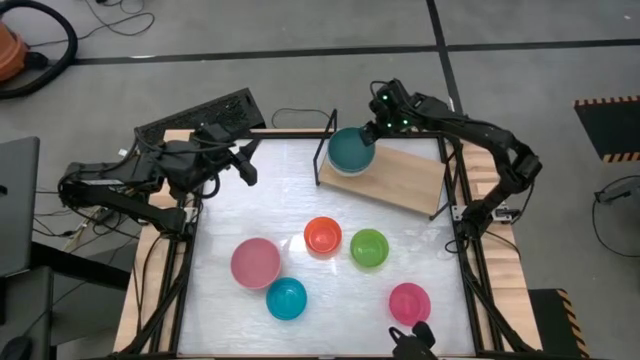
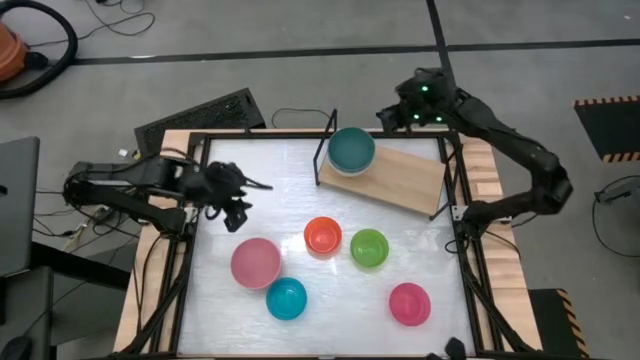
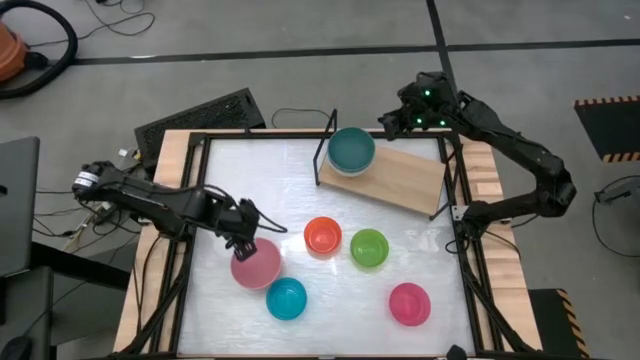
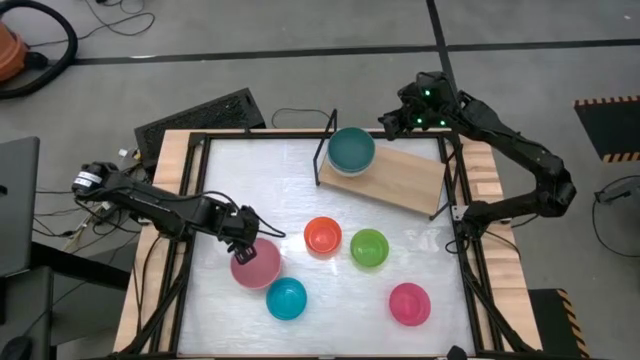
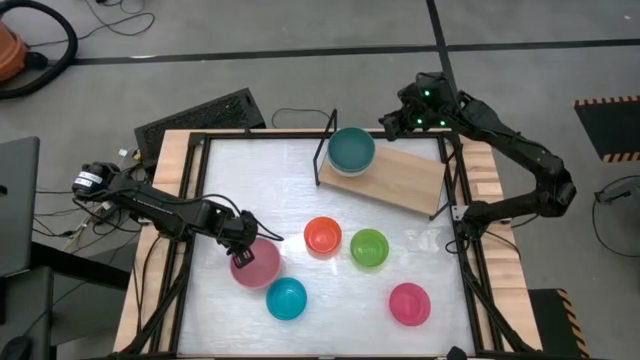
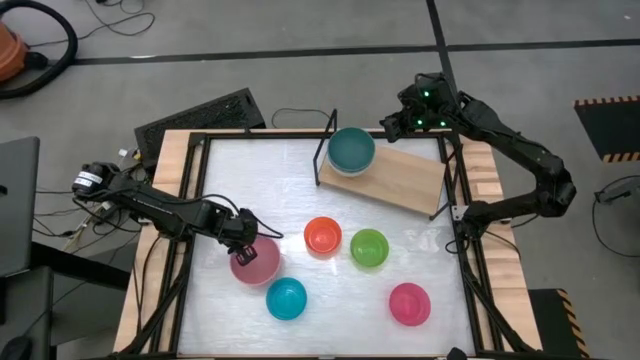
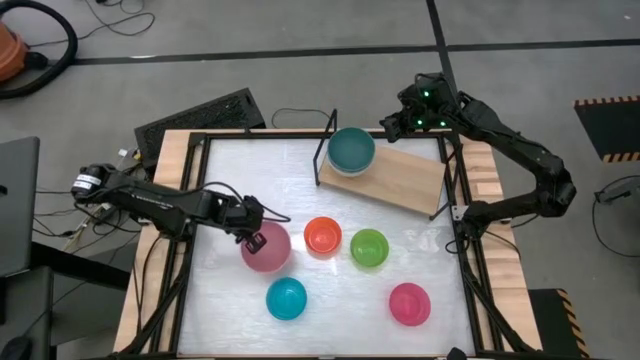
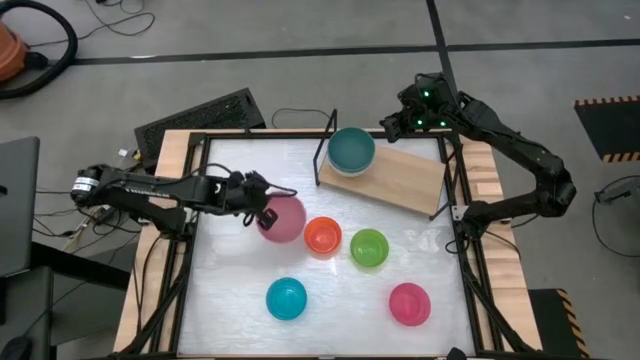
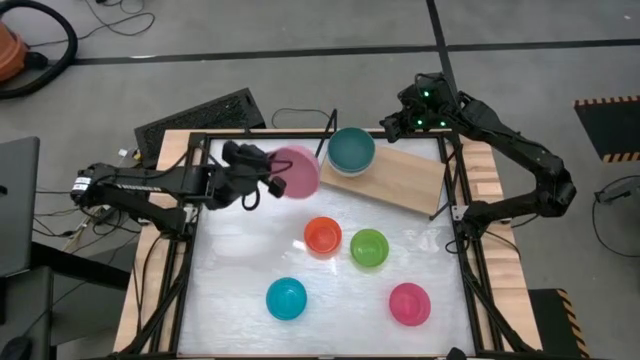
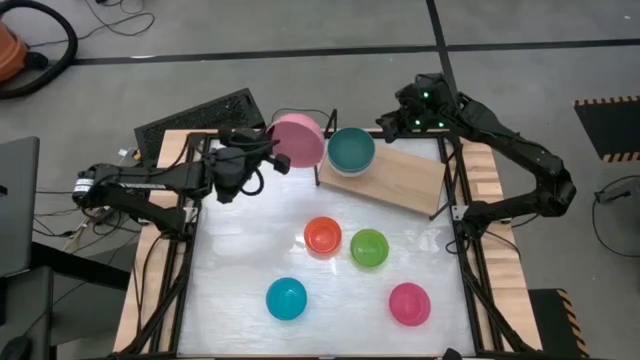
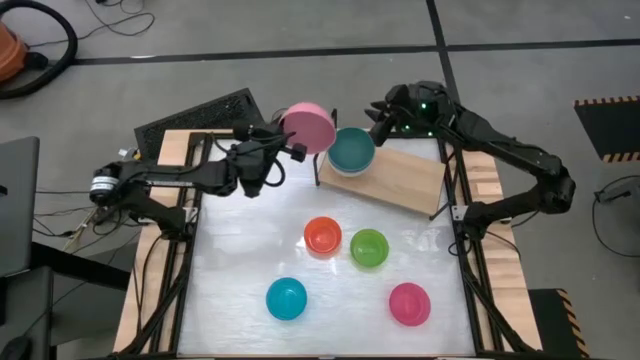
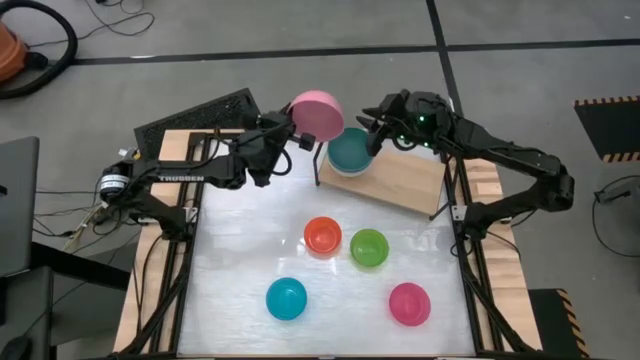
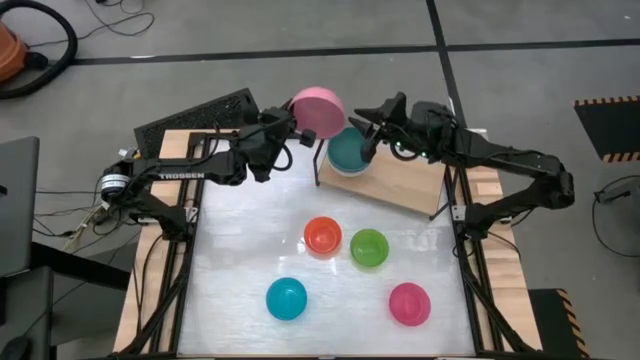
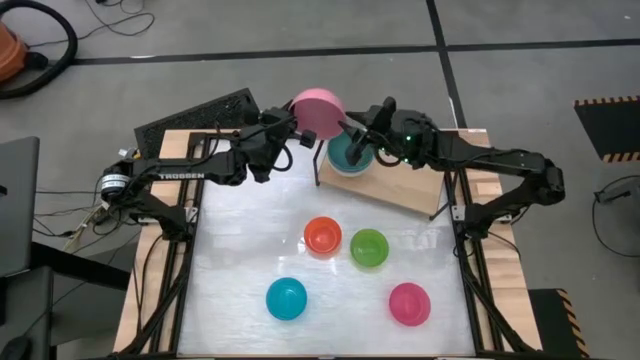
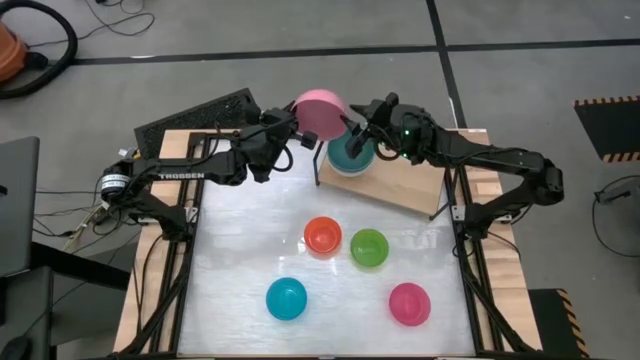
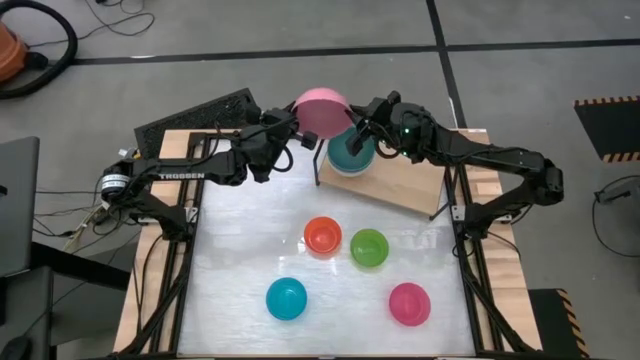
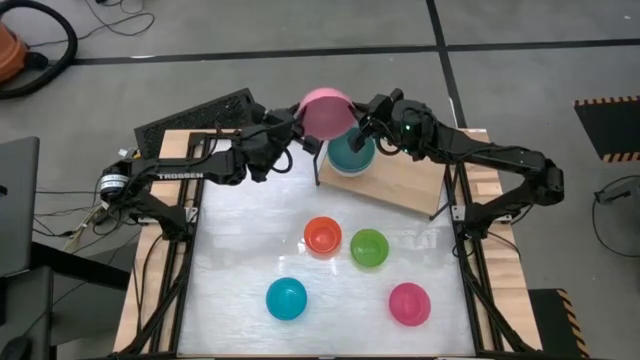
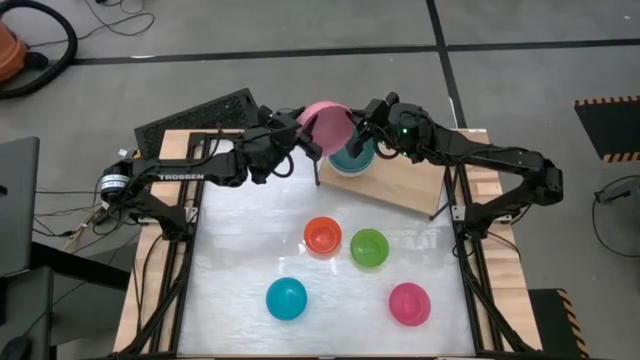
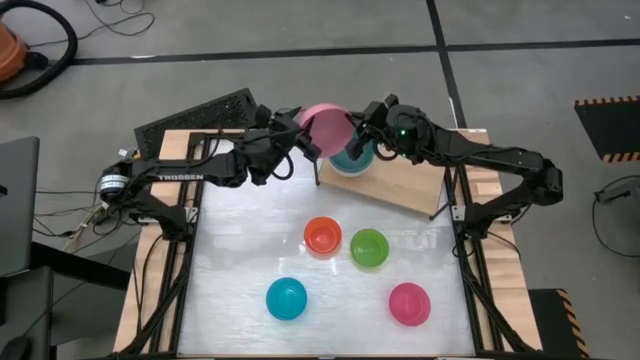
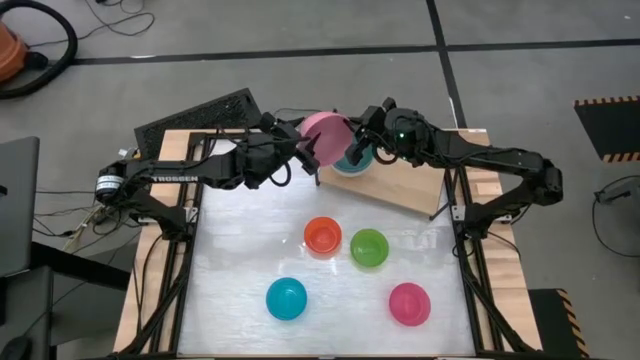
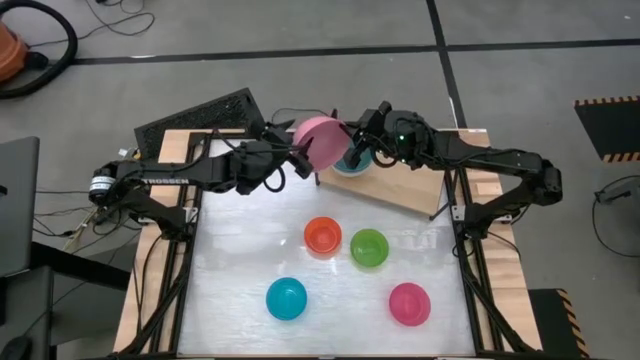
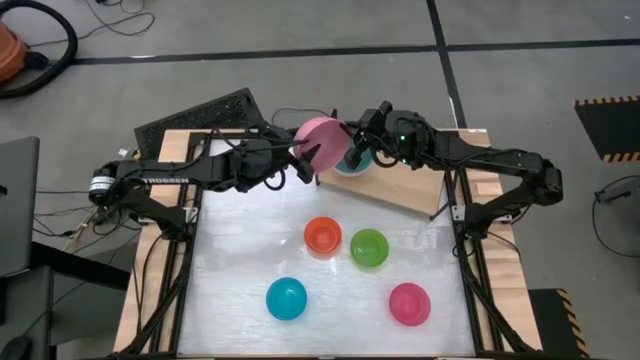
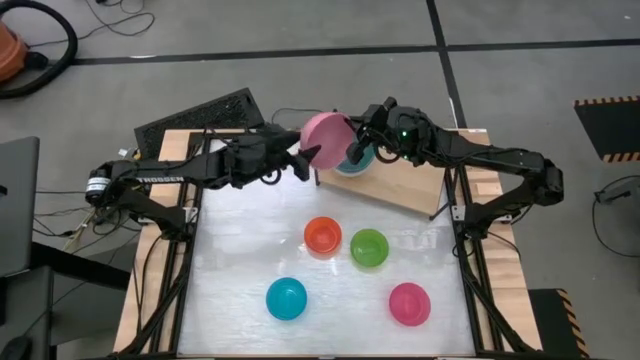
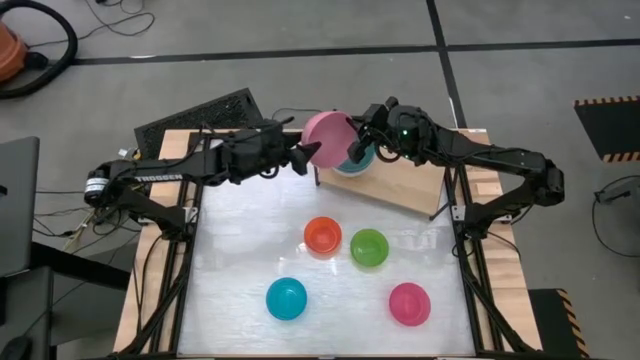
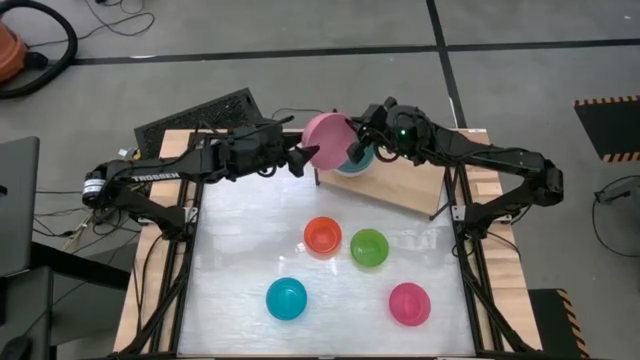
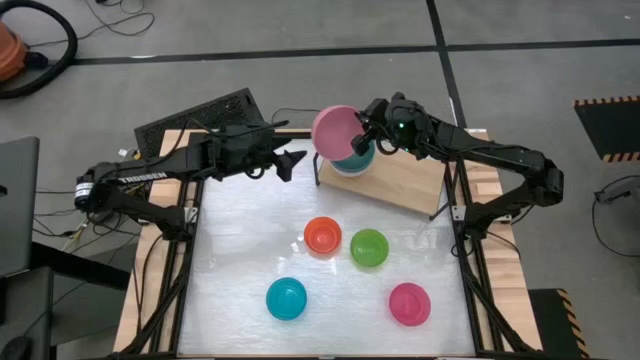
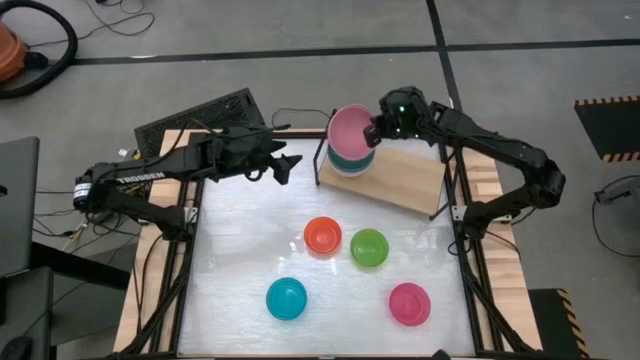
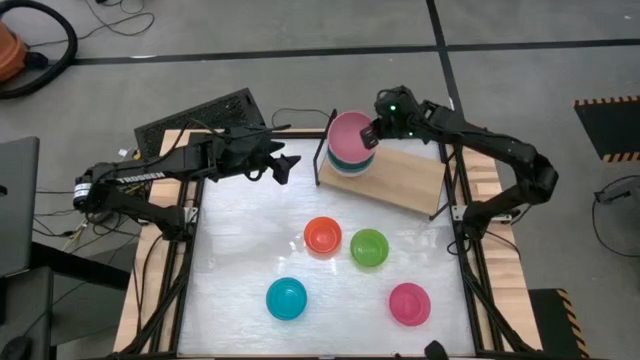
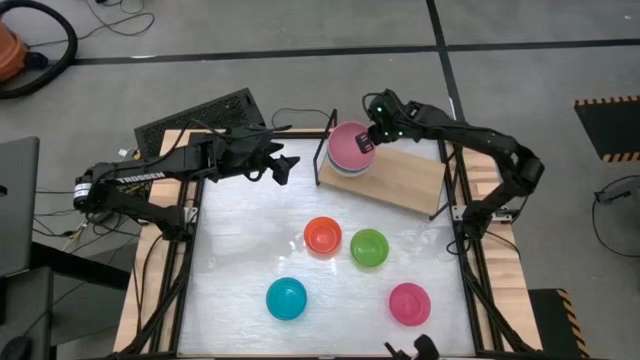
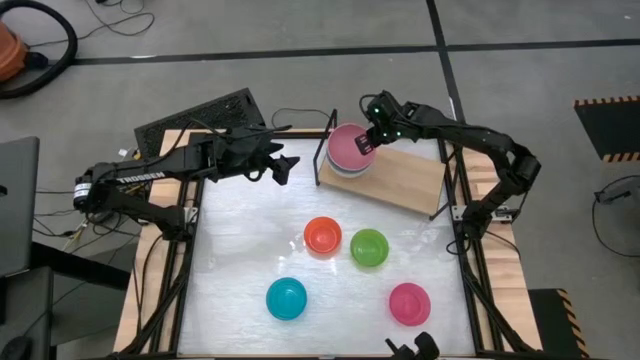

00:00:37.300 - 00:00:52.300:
Task: Place and stack bowls onto a shelf
Stack the pink bowl on top of the green bowl on the shelf

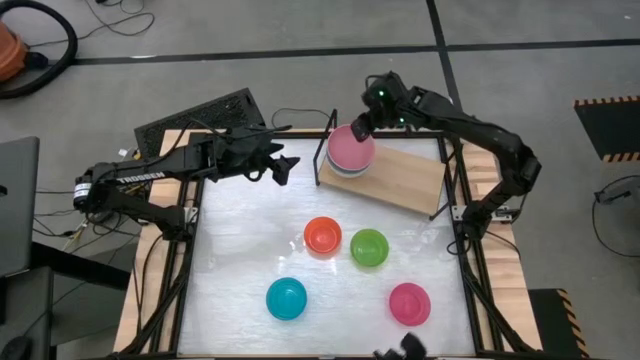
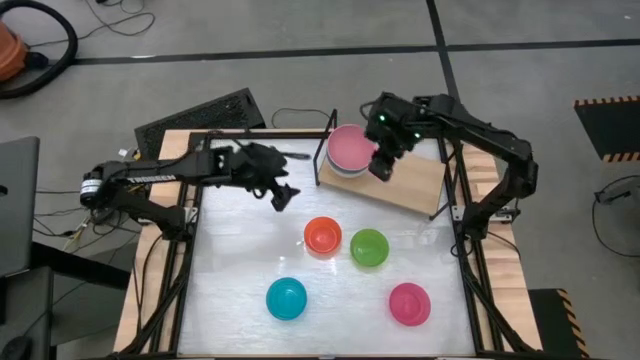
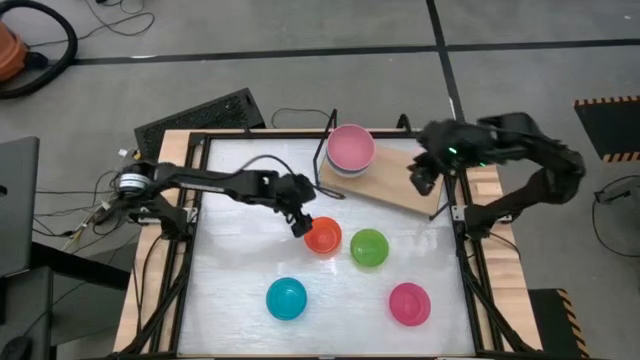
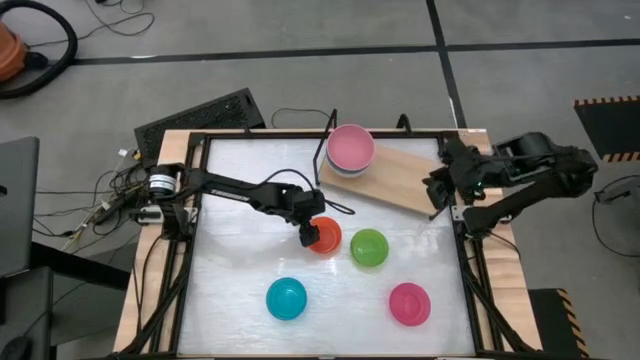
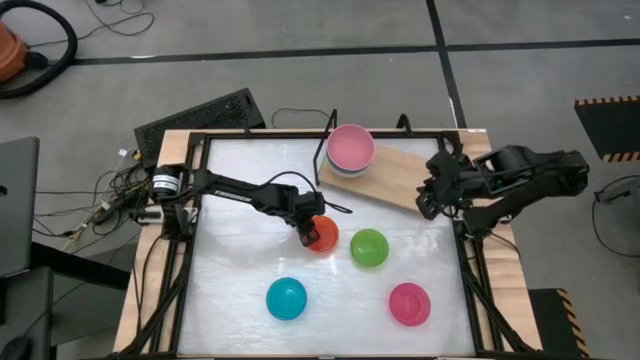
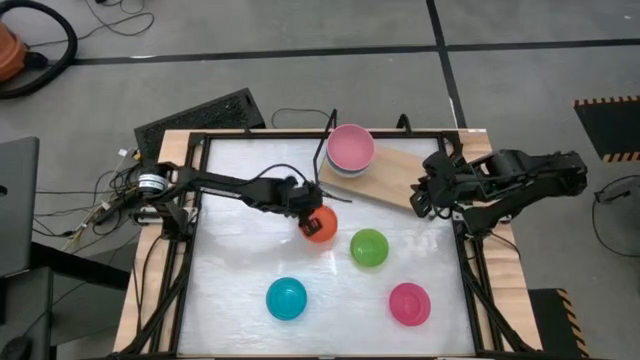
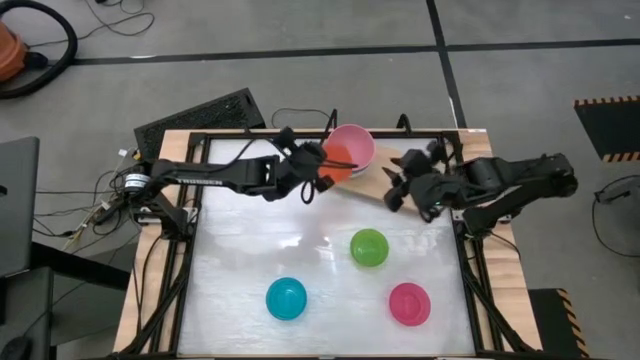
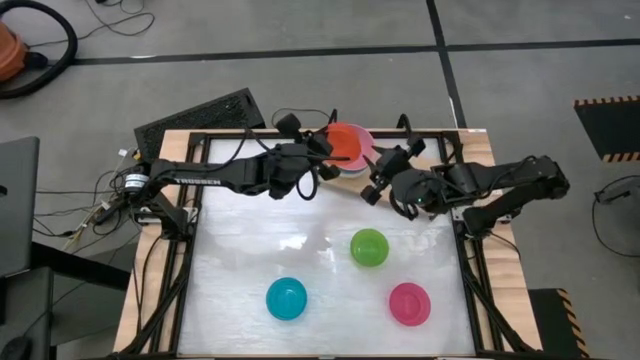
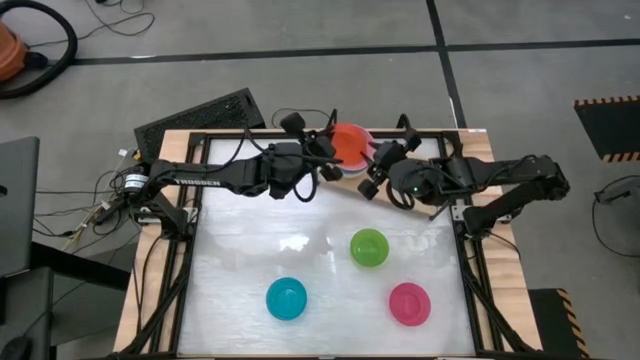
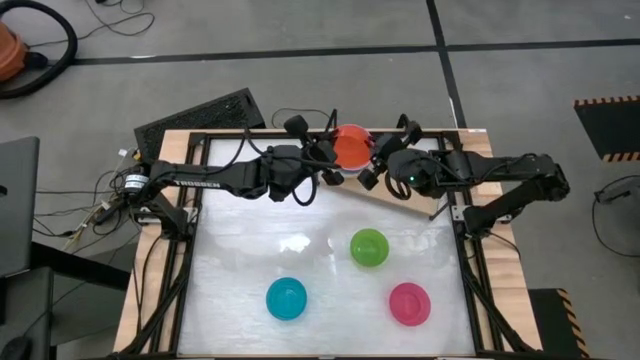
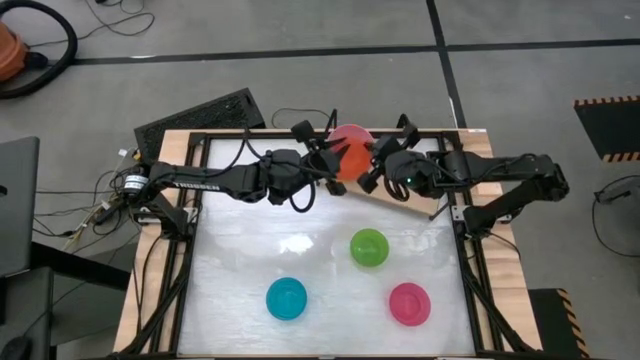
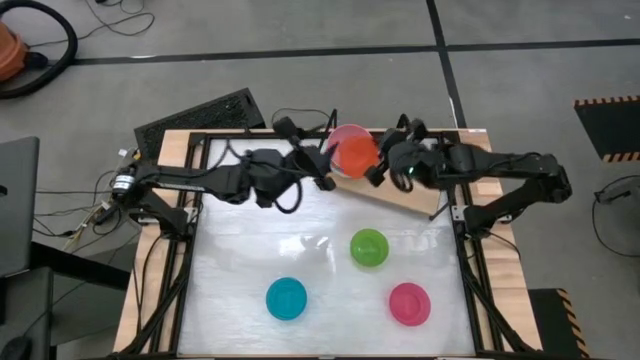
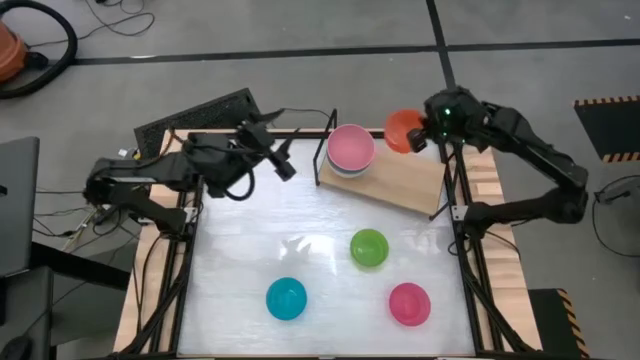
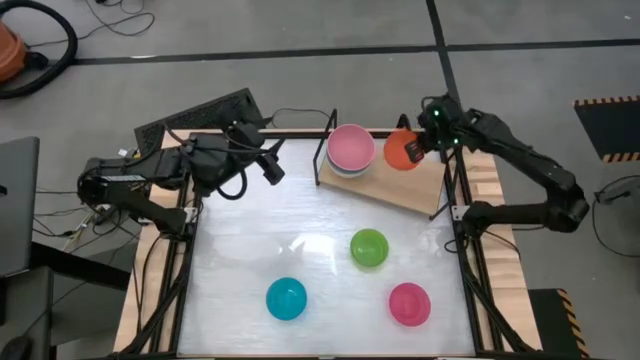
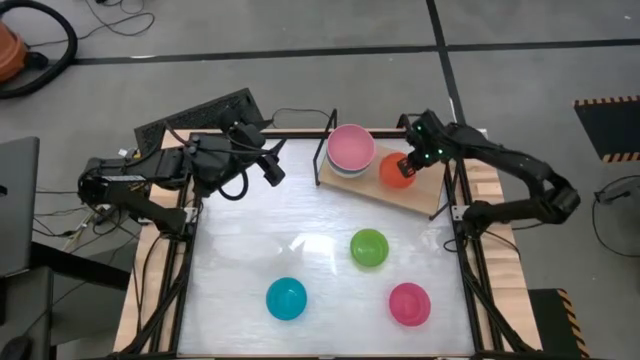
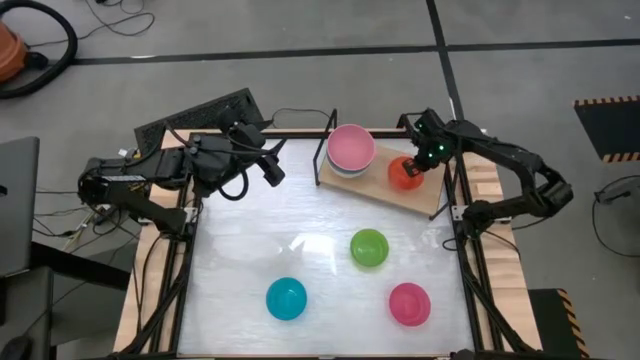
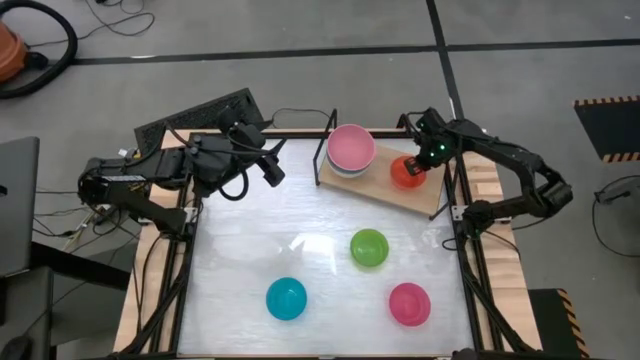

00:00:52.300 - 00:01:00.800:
Put the orange bowl on the shelf
